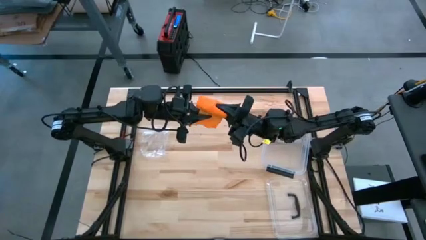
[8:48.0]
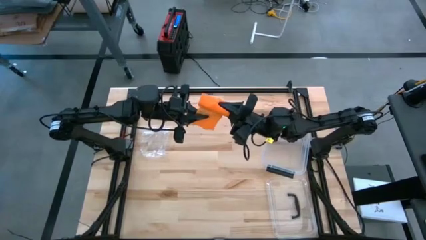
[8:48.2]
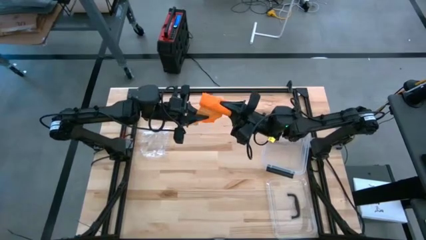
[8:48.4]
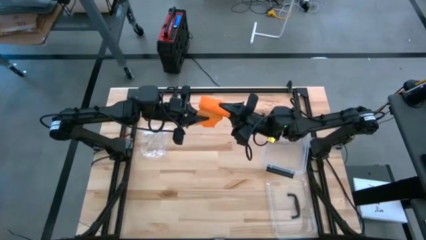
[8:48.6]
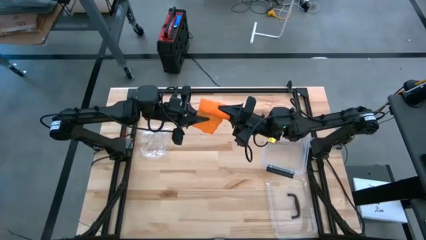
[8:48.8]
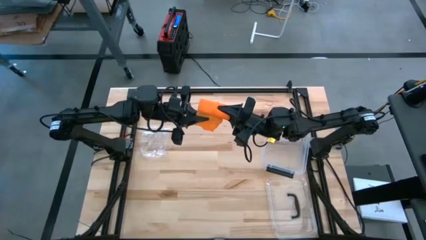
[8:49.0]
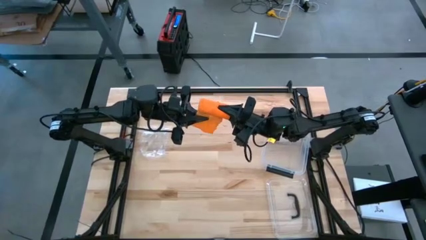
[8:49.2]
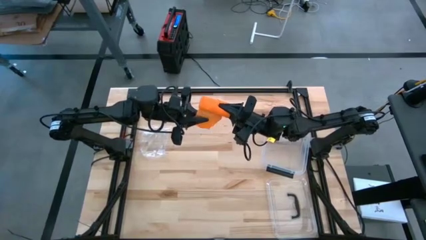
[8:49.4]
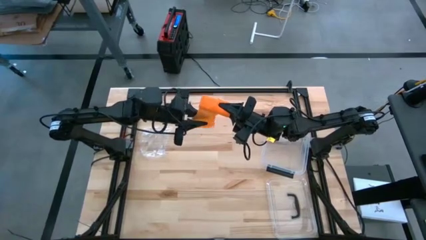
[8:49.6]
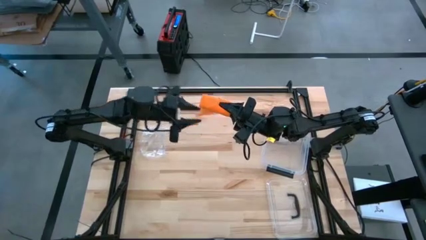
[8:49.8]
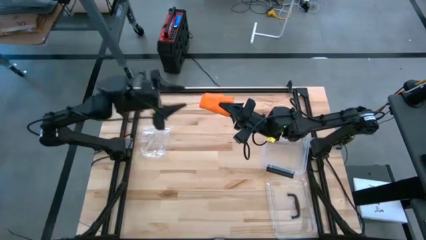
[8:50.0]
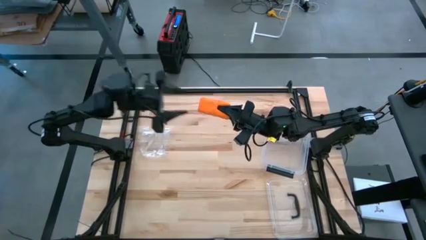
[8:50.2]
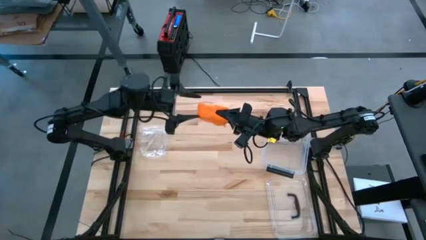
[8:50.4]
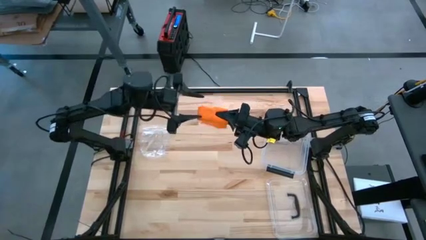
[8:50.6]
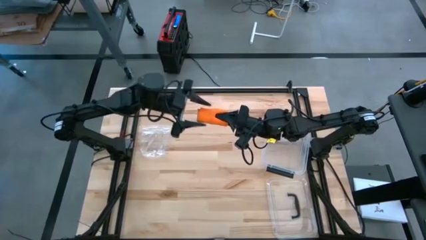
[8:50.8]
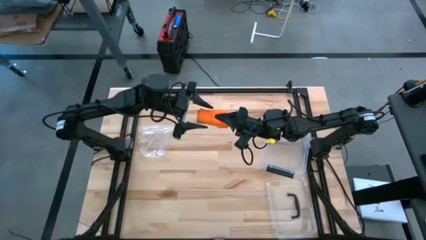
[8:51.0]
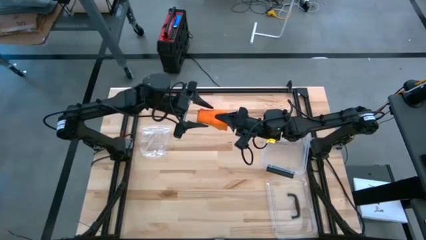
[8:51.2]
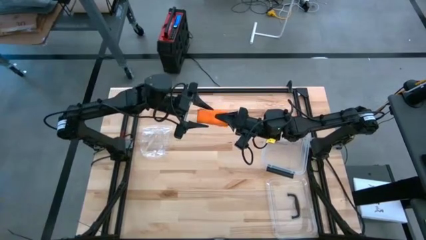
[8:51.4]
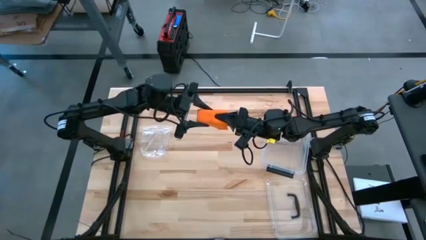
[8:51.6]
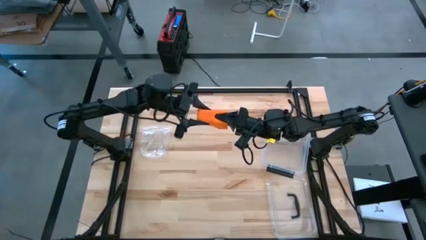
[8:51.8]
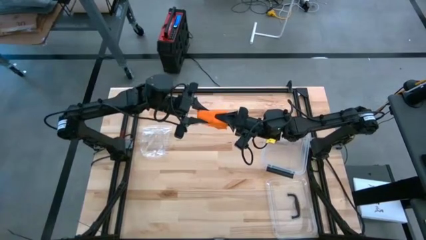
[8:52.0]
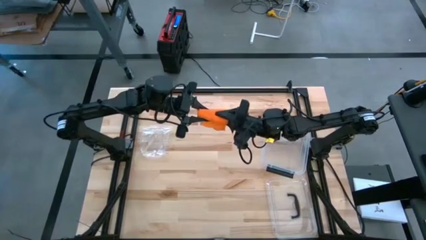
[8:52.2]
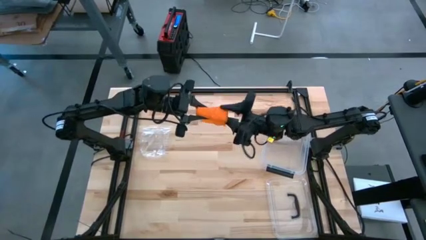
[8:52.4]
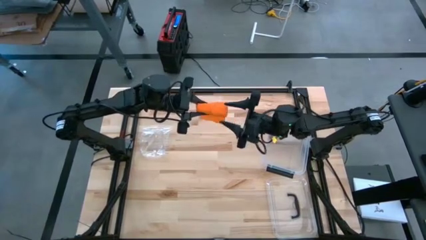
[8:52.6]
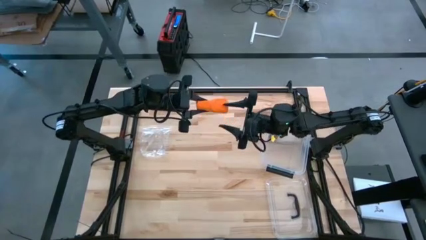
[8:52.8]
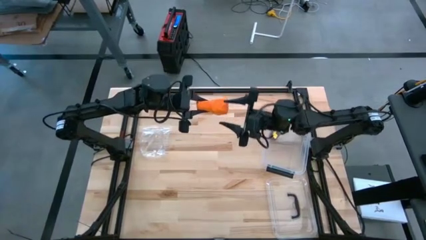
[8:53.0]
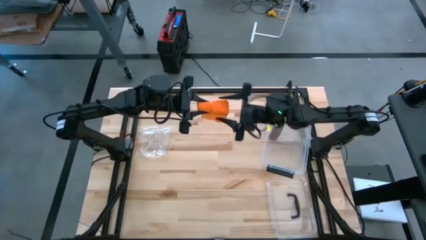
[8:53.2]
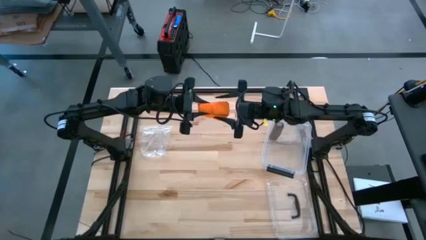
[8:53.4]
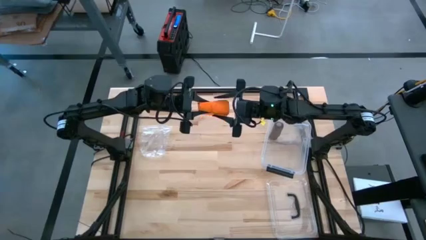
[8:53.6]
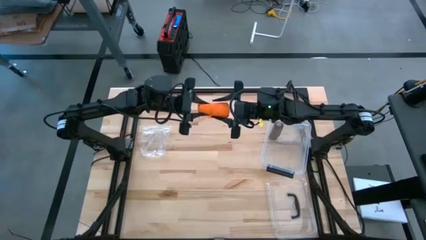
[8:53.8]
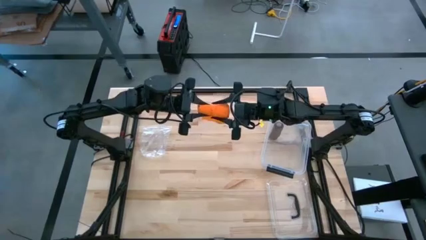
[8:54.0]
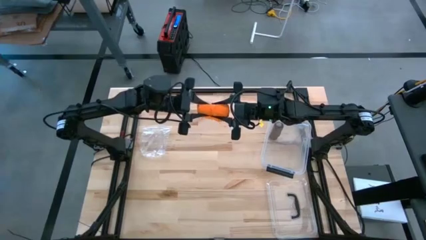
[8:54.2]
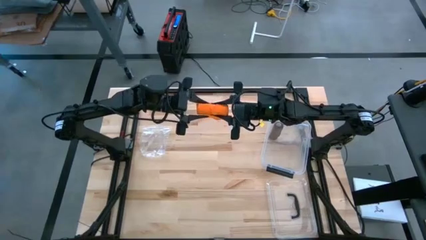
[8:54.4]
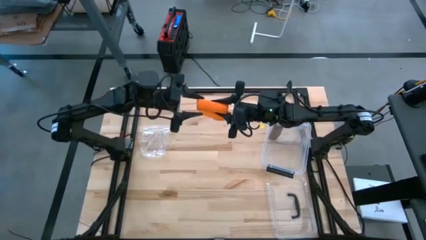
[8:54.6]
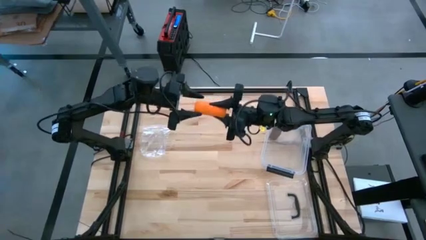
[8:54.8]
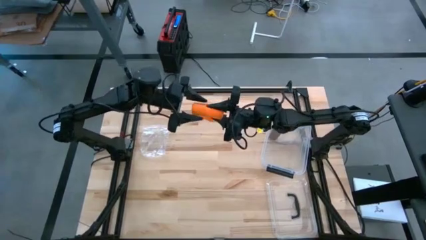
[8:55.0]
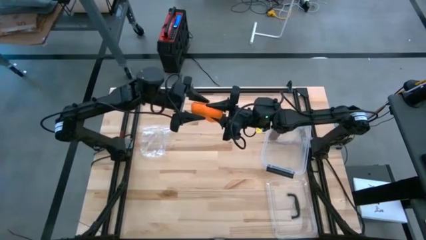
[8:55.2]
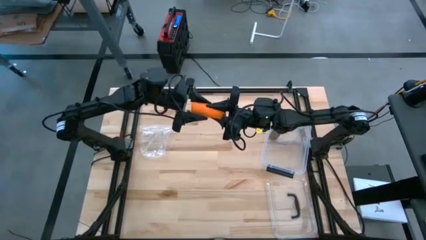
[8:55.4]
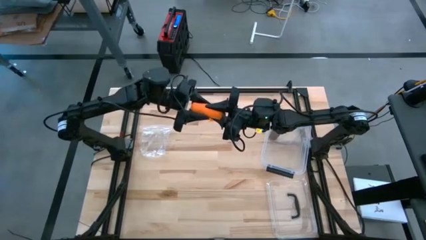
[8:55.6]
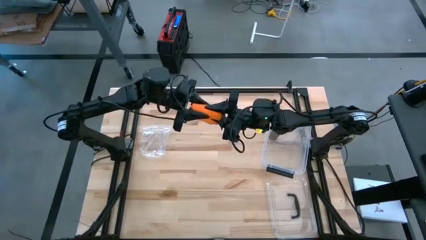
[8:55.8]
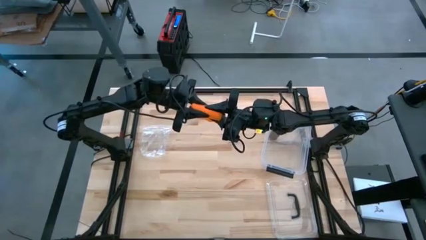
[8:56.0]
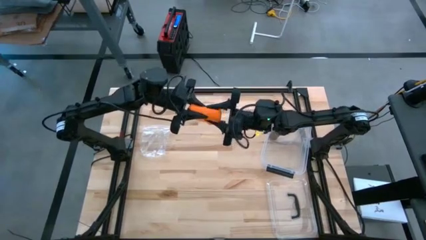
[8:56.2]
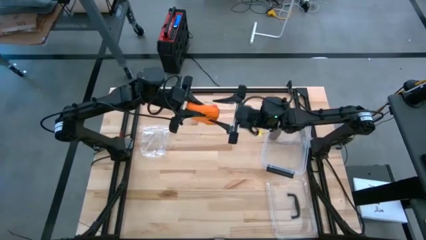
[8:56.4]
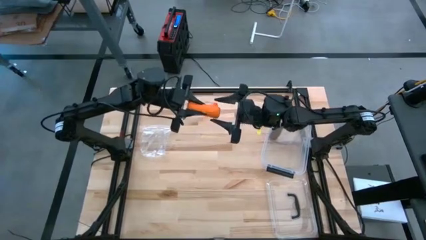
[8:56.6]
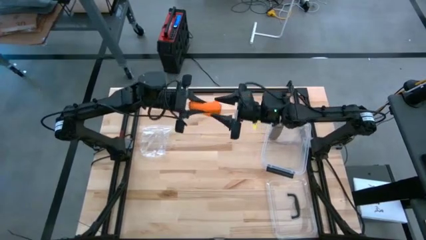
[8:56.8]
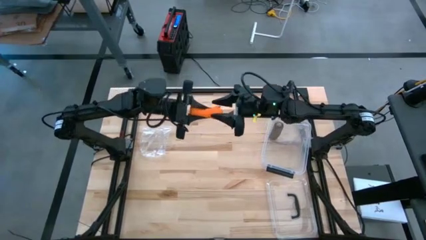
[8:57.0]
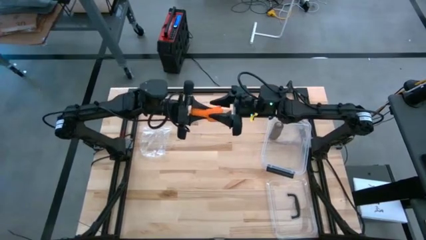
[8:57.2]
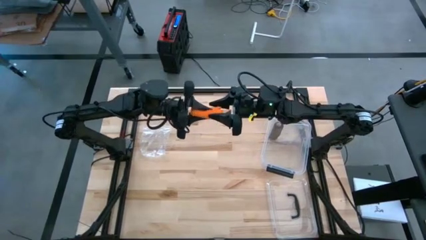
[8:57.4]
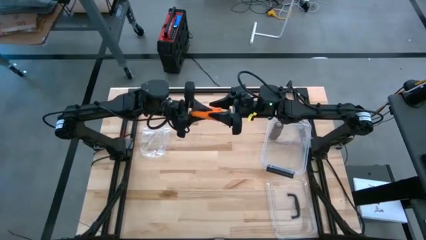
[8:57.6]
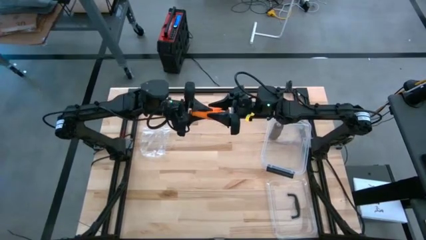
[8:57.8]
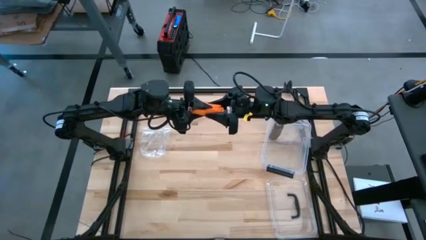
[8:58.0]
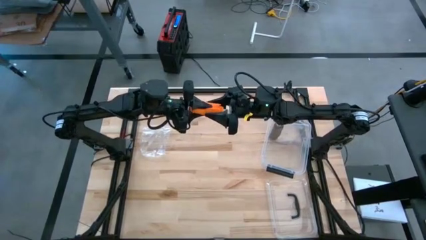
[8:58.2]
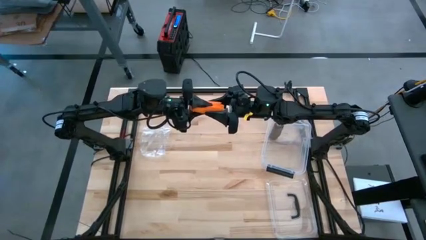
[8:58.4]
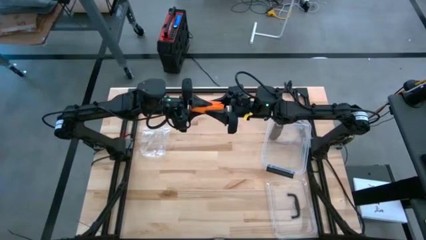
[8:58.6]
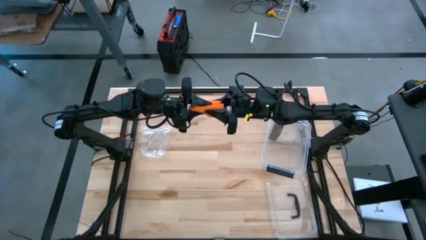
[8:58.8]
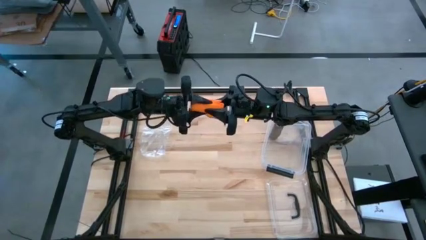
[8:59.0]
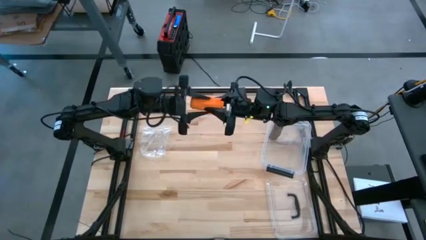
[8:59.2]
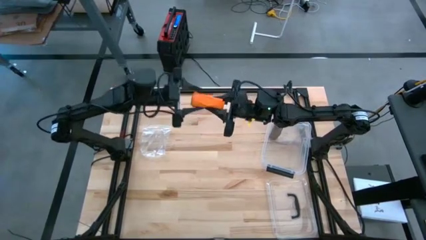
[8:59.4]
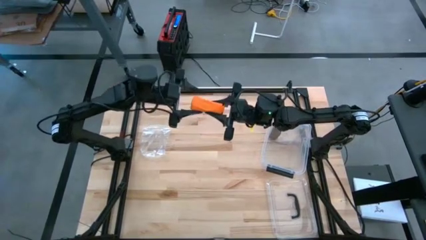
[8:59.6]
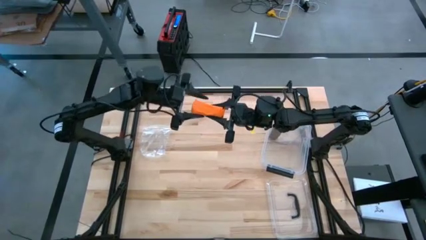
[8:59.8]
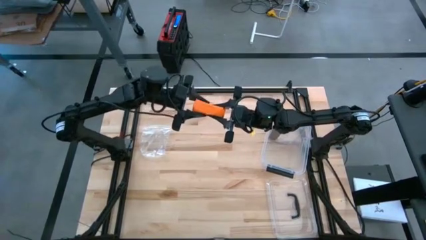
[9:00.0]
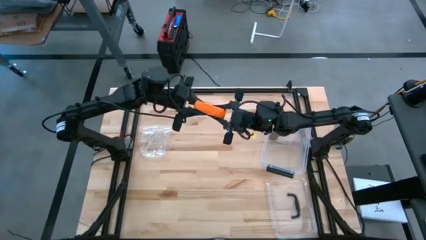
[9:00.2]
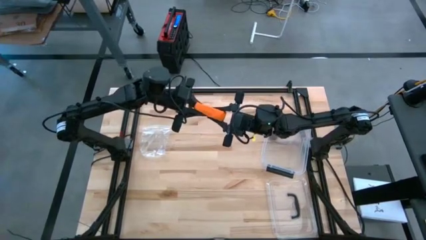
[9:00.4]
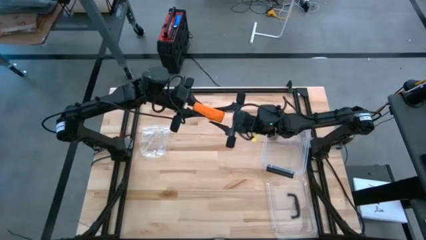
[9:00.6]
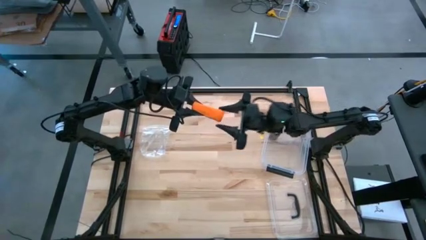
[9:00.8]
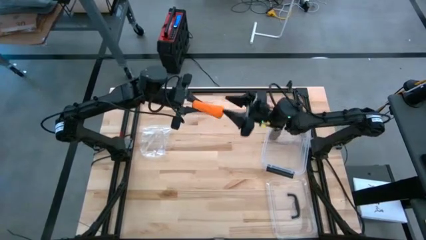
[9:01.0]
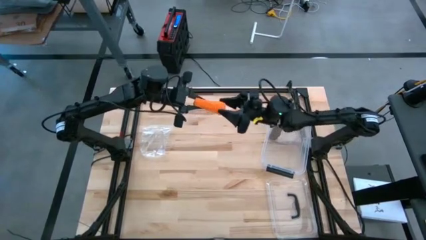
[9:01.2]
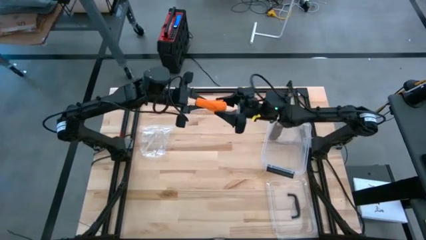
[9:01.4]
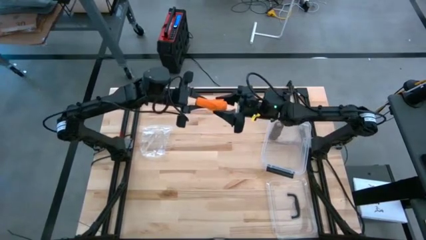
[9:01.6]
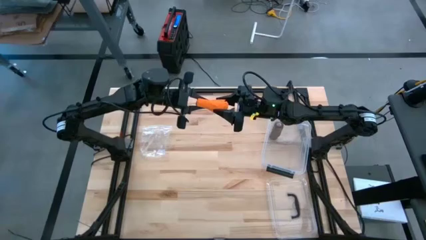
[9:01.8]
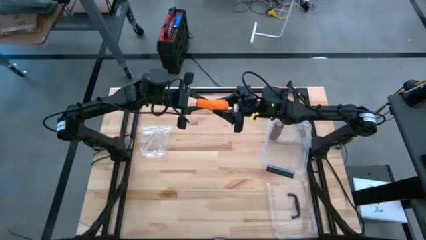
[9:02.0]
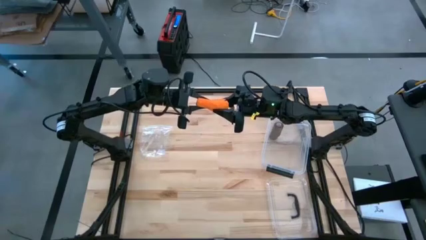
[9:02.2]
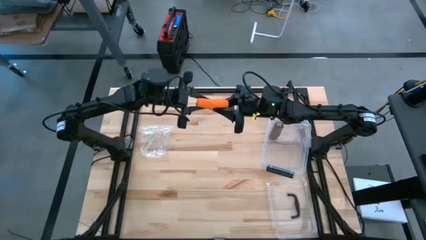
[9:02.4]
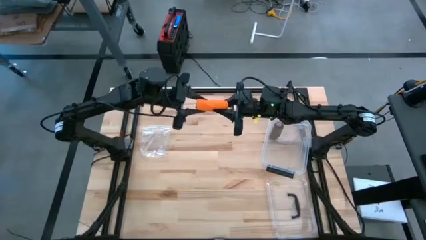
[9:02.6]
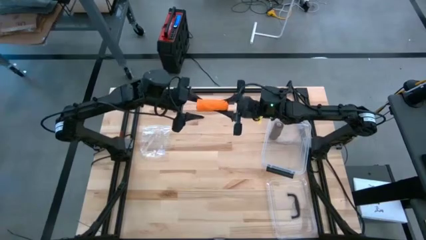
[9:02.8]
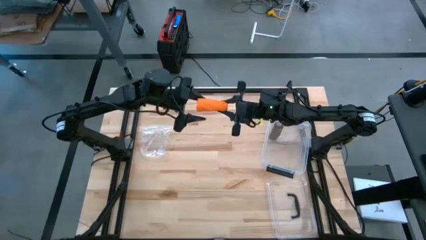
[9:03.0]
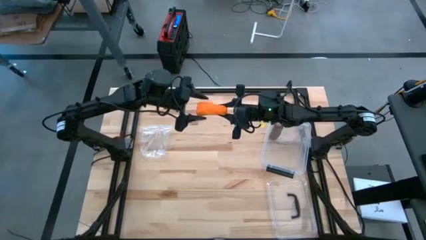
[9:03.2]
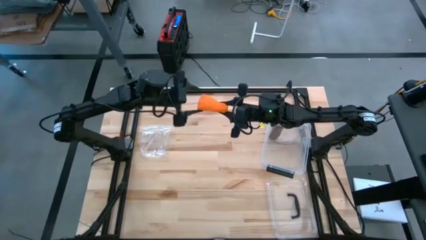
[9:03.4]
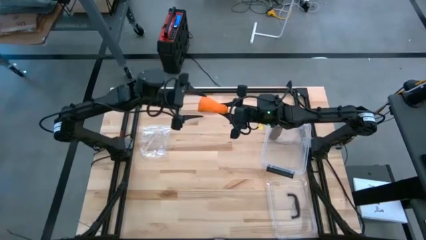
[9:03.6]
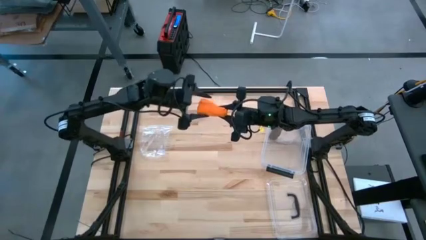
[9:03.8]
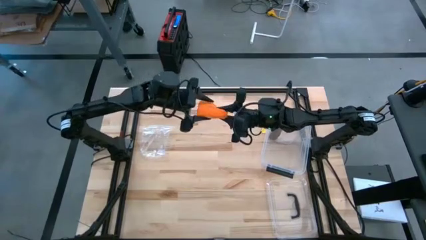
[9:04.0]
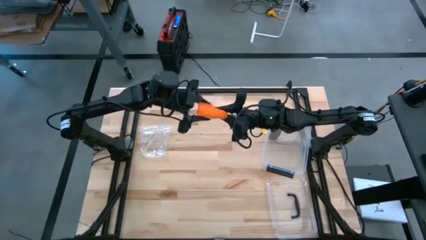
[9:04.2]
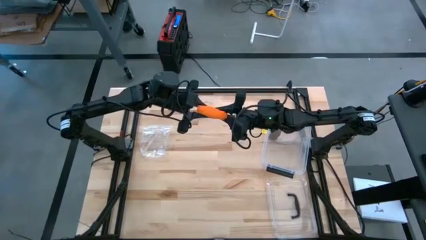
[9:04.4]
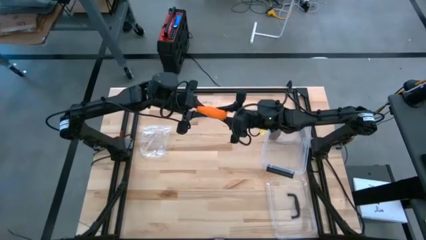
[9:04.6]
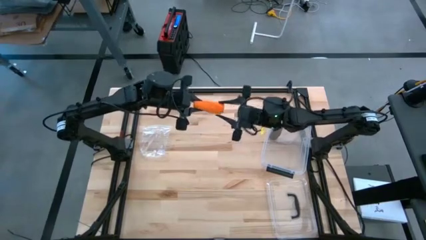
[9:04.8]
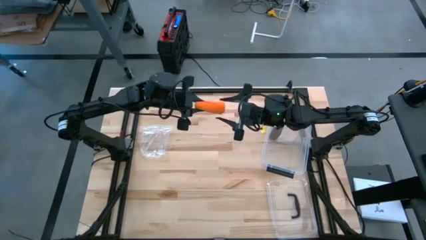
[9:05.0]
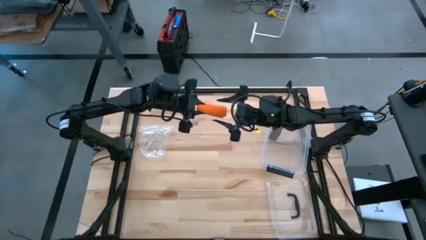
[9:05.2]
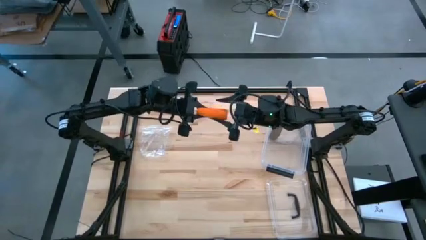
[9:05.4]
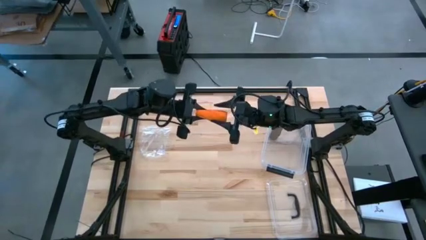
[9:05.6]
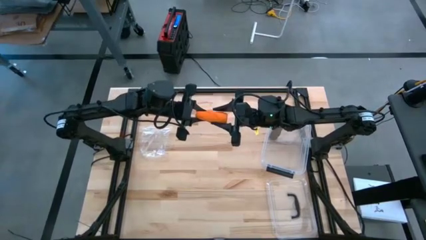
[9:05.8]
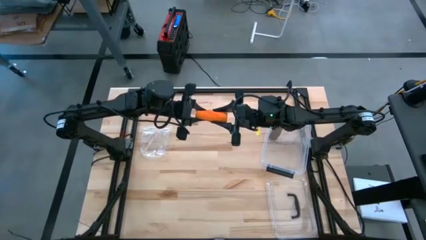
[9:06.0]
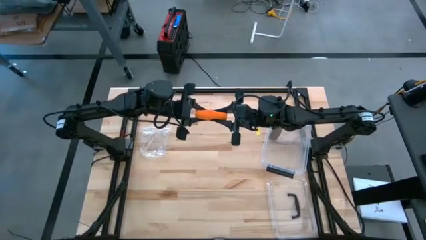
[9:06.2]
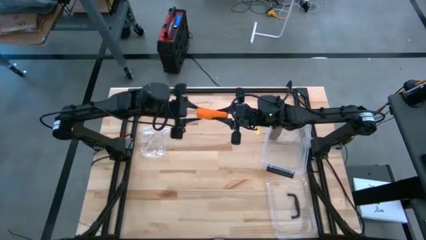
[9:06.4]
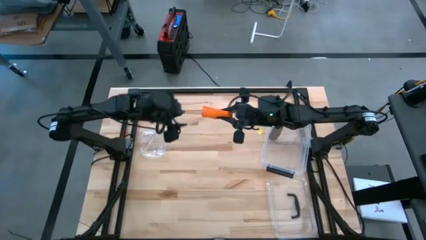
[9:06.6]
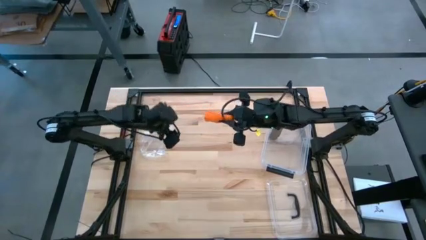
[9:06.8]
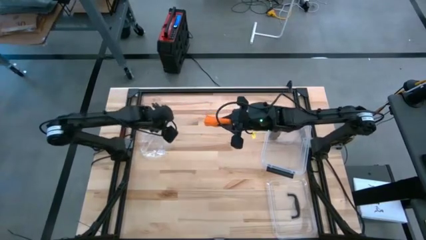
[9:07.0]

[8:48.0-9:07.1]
Task: Roll bandage
Roll the orange bandage
